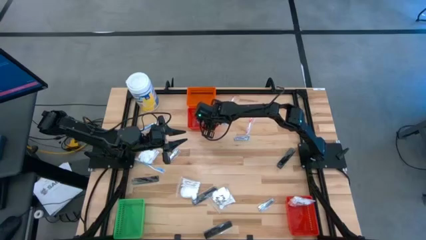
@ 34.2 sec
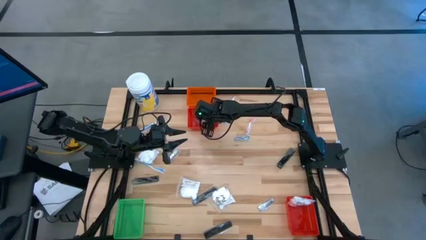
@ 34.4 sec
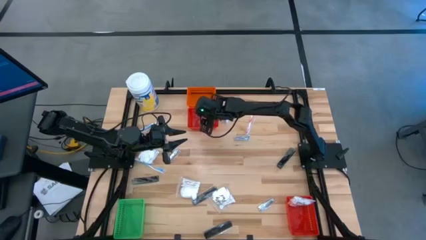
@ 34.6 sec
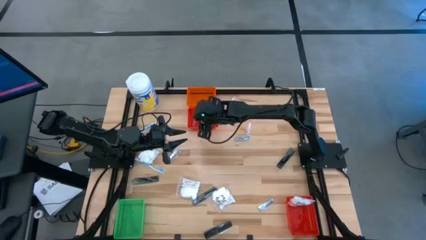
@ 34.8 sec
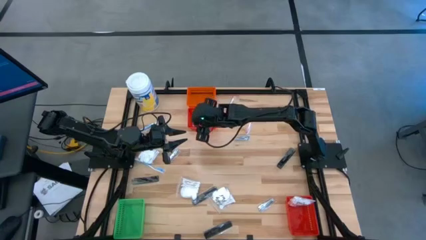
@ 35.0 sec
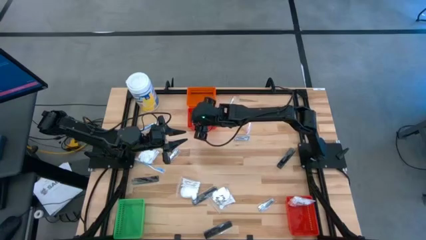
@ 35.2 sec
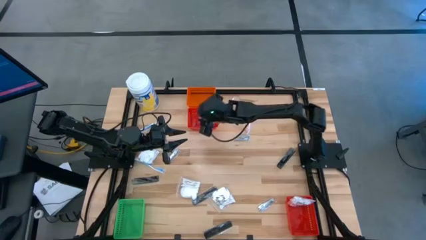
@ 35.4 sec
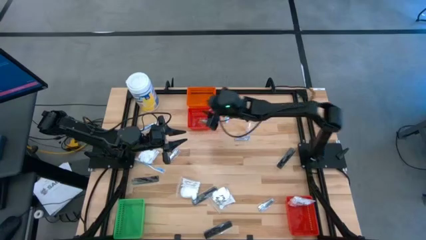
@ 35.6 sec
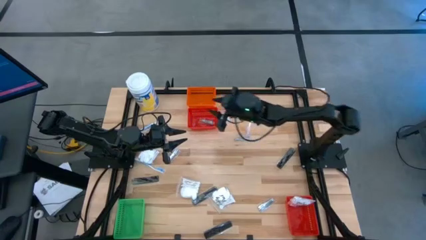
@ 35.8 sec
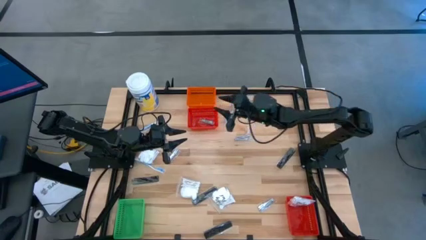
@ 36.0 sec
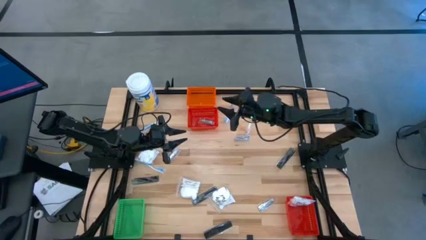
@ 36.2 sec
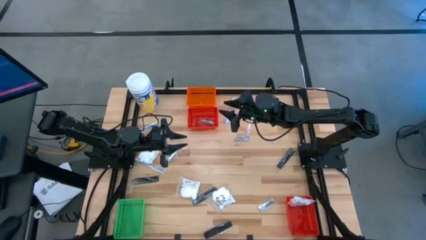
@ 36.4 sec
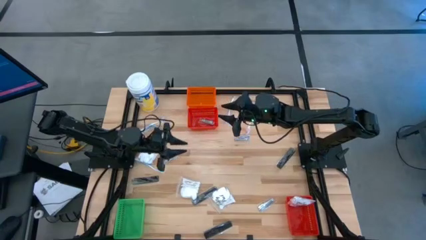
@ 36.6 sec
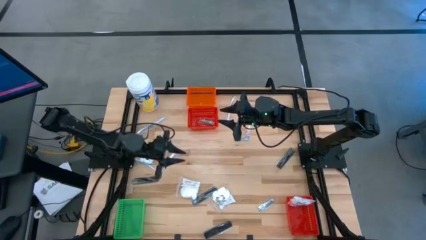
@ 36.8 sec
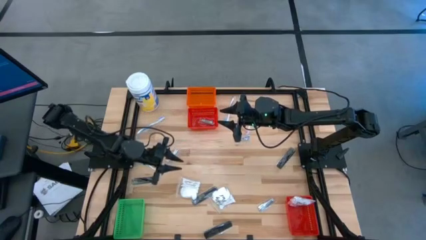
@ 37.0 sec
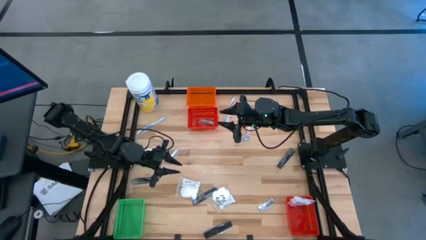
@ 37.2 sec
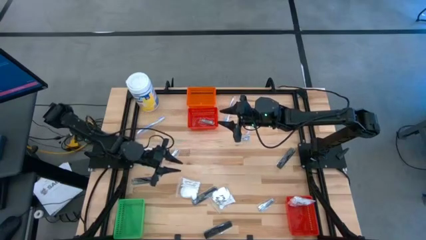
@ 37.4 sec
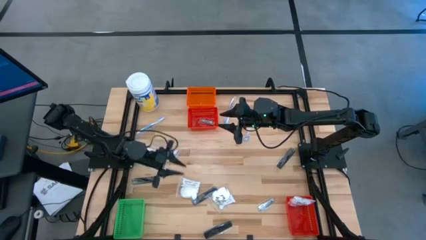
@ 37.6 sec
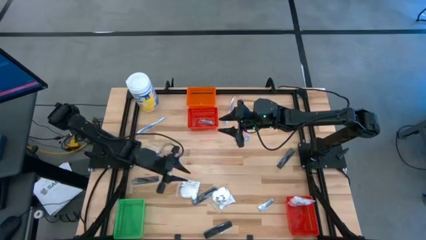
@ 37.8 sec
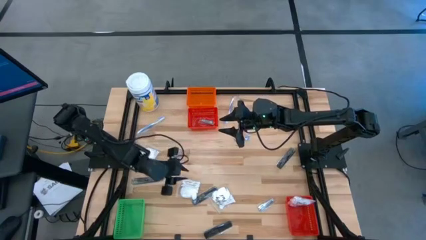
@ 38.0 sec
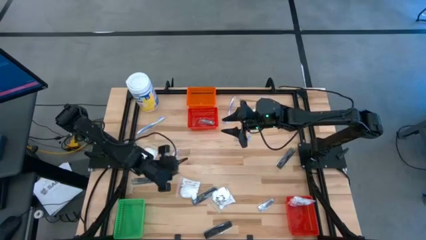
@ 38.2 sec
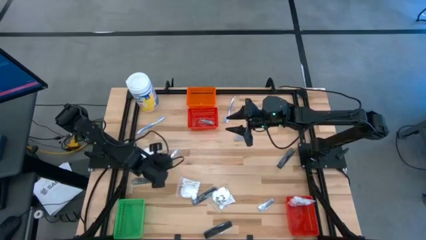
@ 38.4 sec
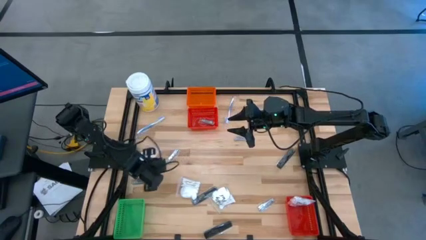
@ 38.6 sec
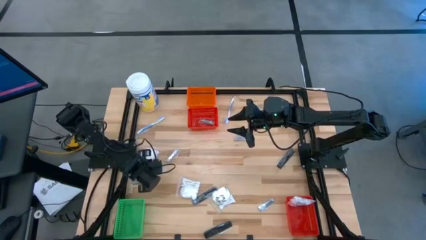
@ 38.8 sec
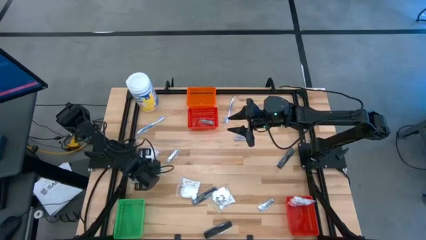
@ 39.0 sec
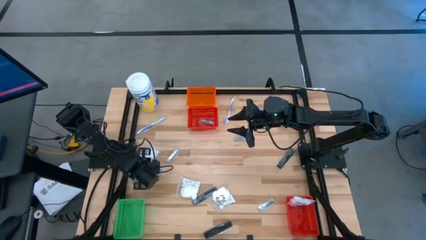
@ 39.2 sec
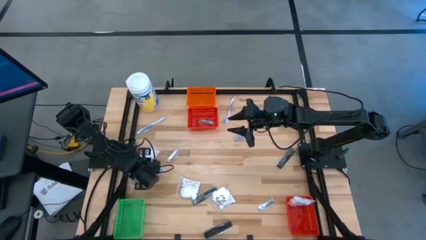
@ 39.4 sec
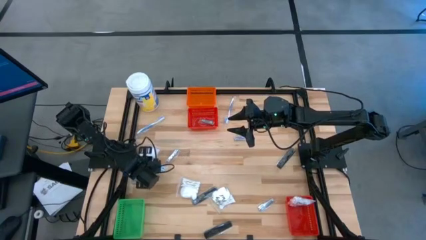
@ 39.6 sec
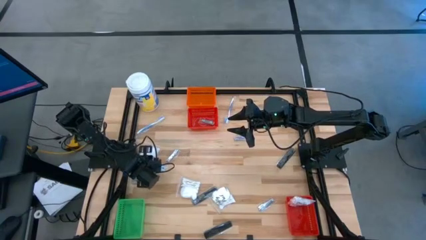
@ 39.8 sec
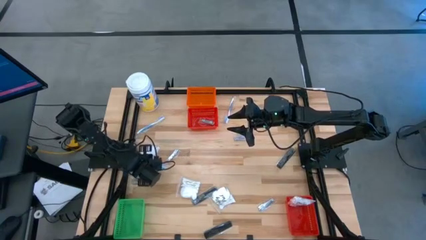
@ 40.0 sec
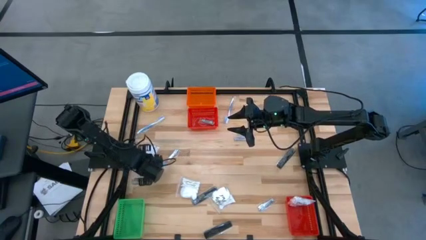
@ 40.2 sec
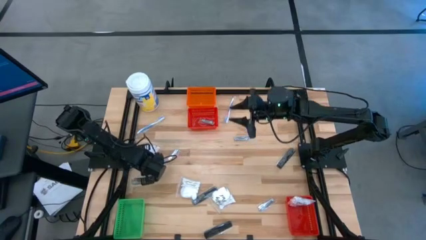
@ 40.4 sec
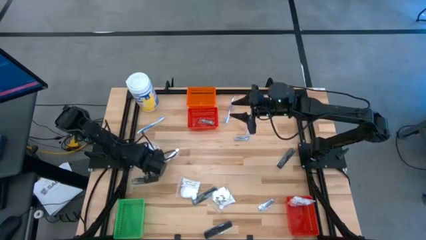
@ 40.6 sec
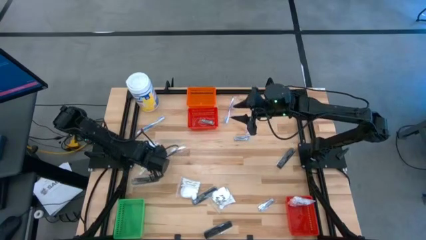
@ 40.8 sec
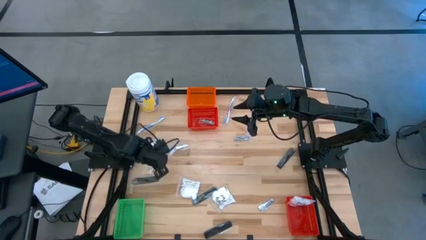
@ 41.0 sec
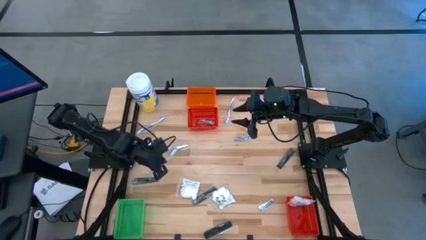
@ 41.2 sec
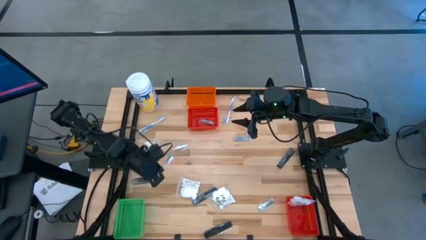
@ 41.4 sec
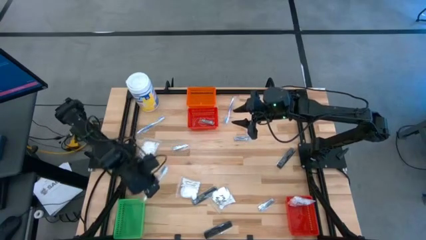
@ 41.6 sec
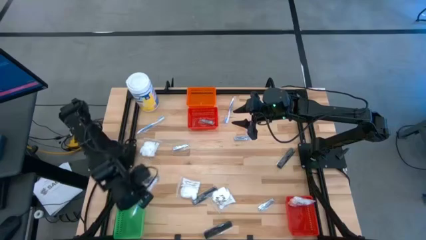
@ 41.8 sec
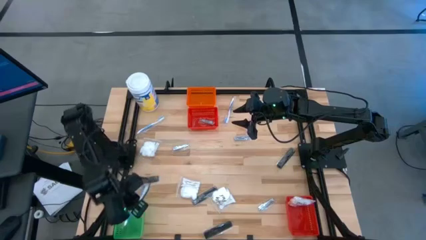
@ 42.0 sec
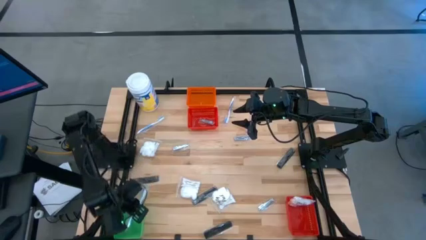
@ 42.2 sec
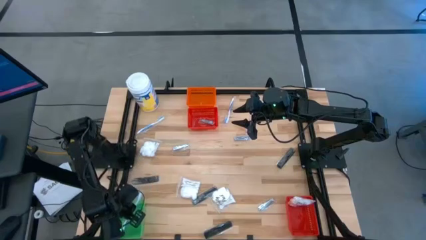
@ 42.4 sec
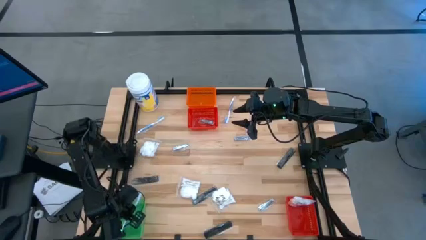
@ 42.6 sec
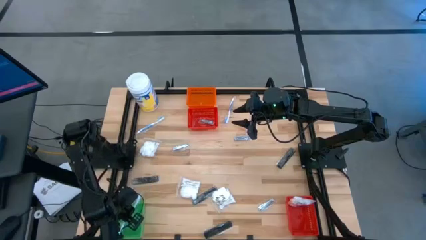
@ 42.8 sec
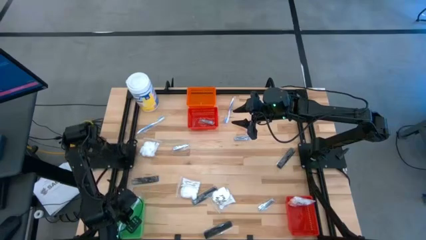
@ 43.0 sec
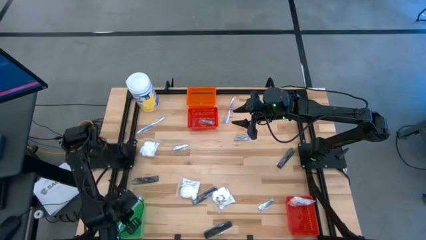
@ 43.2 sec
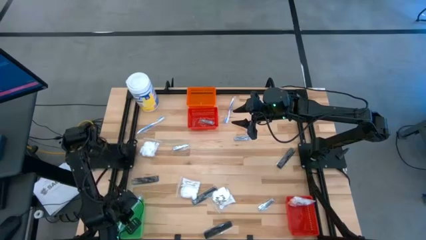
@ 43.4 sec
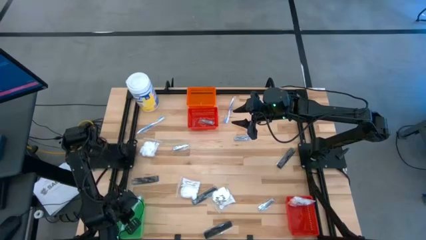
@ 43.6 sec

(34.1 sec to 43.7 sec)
Task: Pick & Place Travel size toiletries
Put the blue toothbrush into the green basket

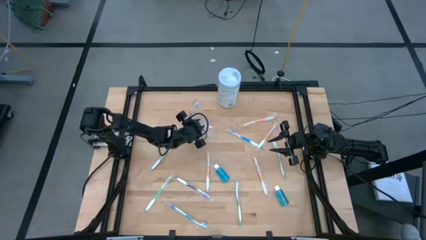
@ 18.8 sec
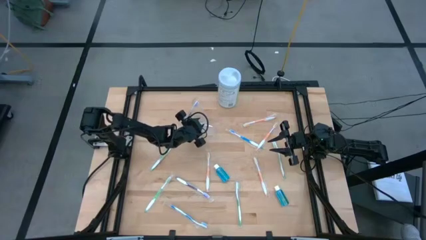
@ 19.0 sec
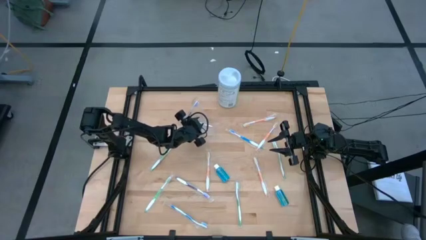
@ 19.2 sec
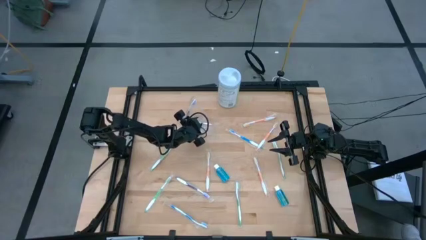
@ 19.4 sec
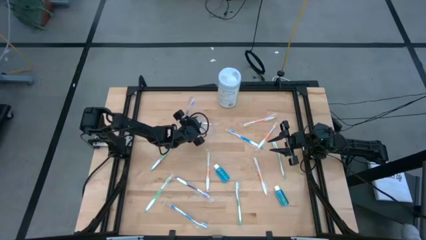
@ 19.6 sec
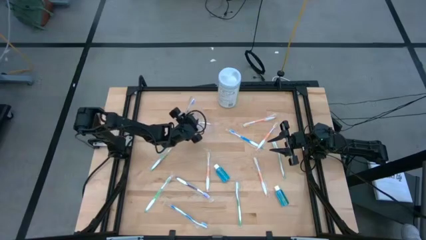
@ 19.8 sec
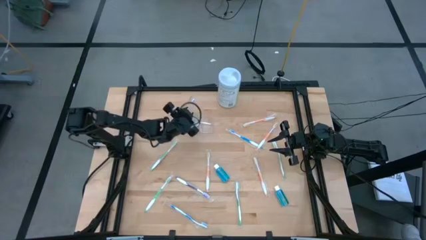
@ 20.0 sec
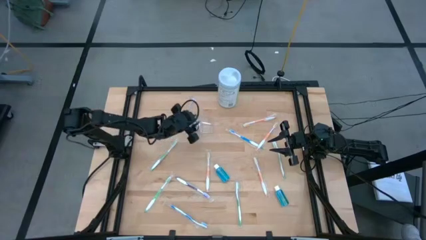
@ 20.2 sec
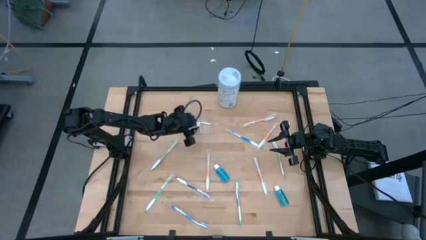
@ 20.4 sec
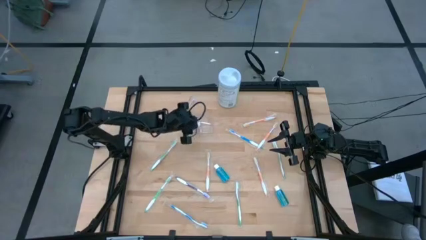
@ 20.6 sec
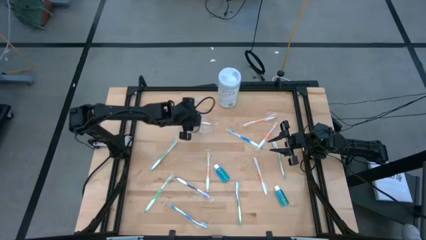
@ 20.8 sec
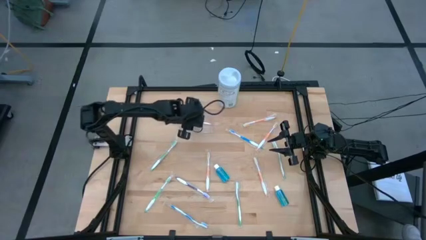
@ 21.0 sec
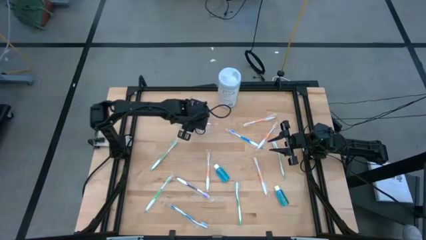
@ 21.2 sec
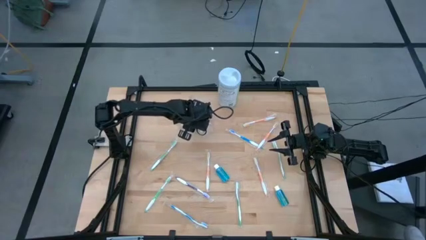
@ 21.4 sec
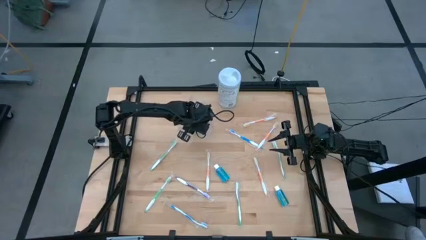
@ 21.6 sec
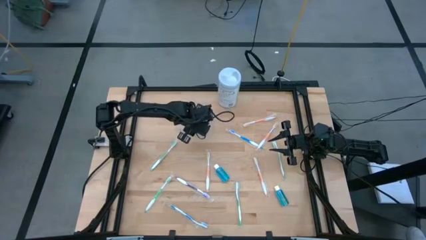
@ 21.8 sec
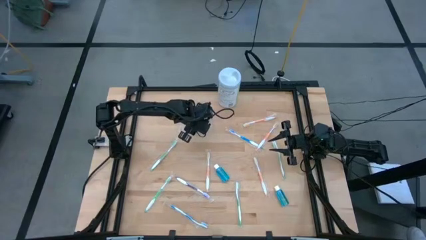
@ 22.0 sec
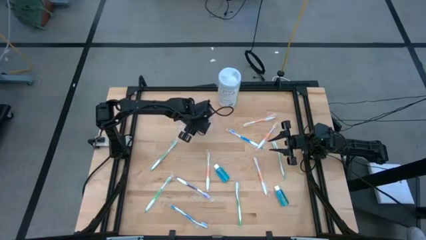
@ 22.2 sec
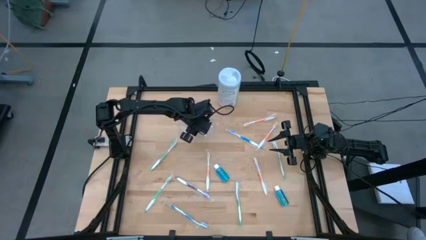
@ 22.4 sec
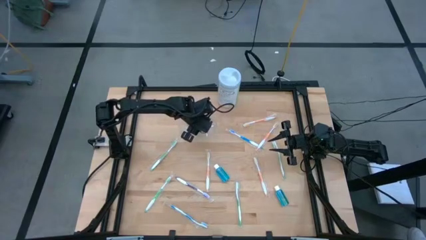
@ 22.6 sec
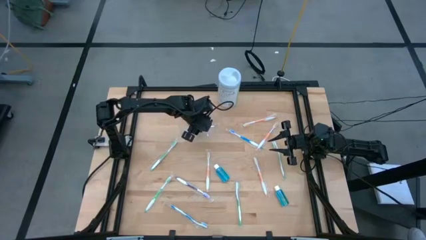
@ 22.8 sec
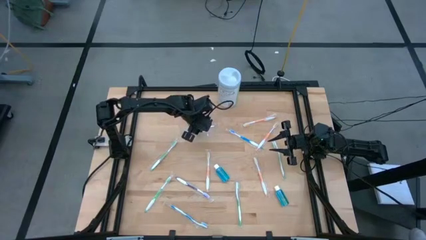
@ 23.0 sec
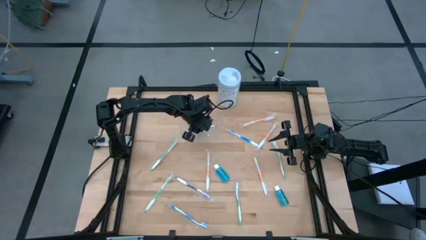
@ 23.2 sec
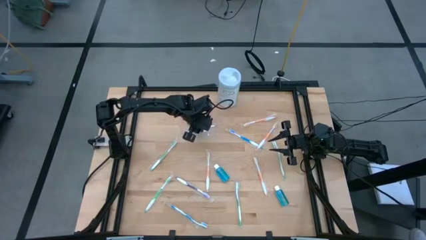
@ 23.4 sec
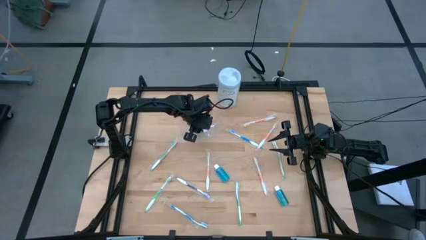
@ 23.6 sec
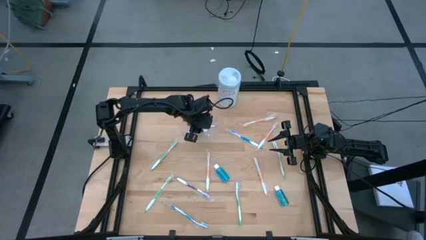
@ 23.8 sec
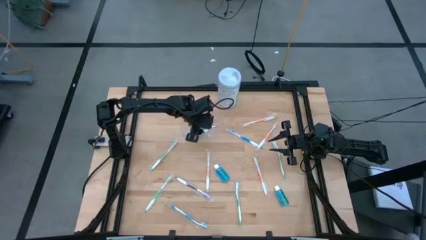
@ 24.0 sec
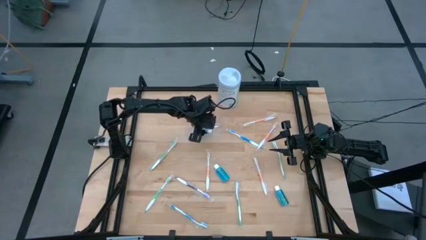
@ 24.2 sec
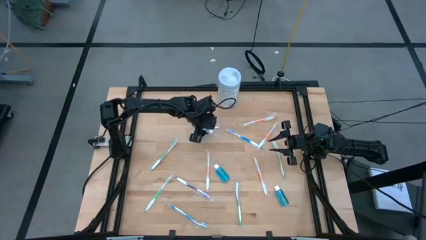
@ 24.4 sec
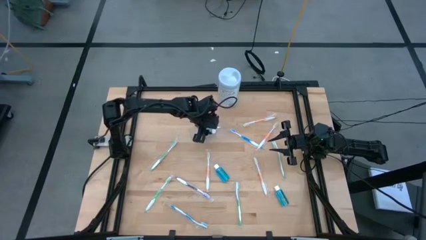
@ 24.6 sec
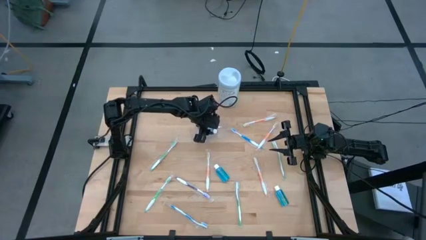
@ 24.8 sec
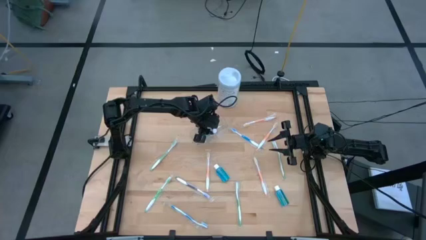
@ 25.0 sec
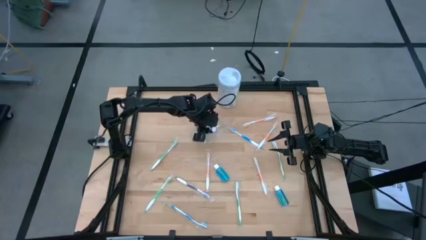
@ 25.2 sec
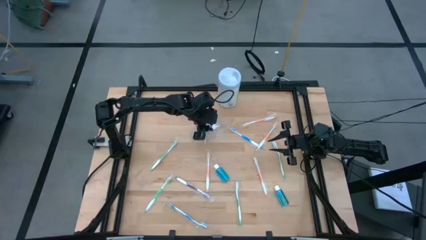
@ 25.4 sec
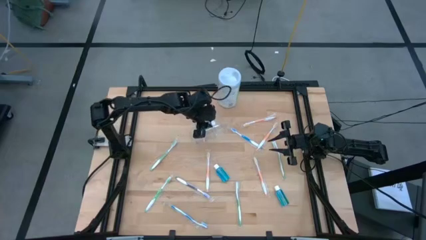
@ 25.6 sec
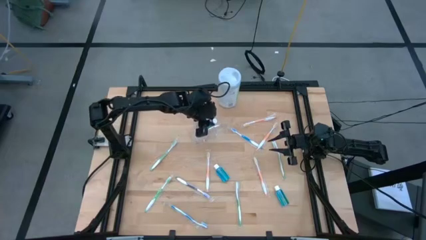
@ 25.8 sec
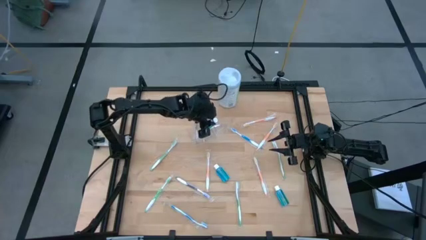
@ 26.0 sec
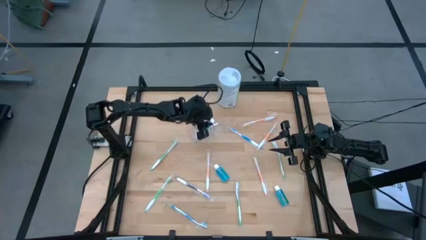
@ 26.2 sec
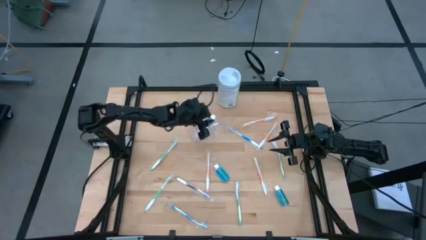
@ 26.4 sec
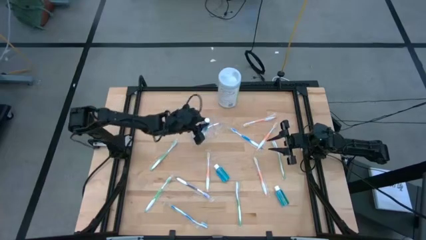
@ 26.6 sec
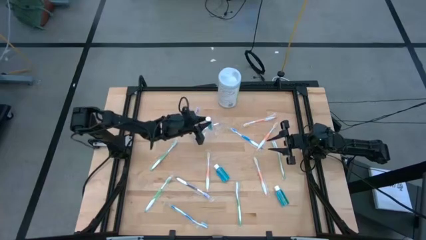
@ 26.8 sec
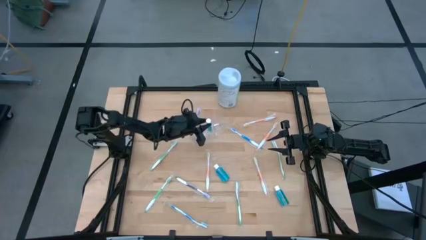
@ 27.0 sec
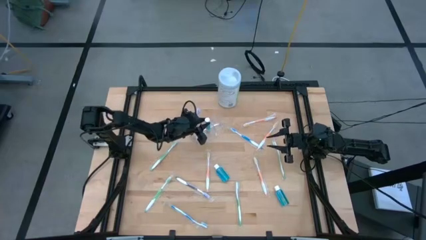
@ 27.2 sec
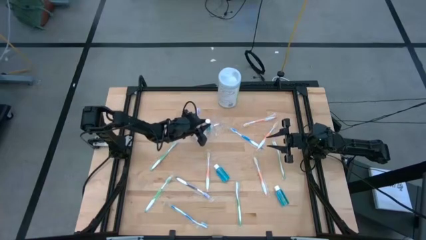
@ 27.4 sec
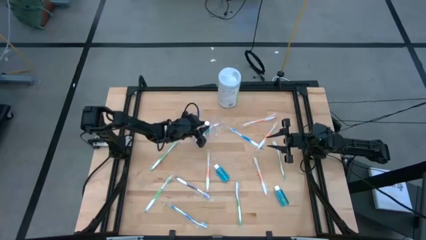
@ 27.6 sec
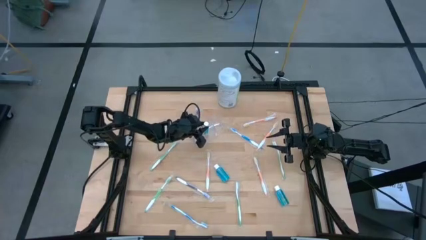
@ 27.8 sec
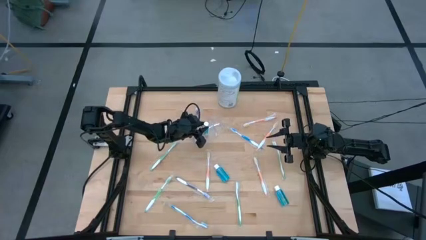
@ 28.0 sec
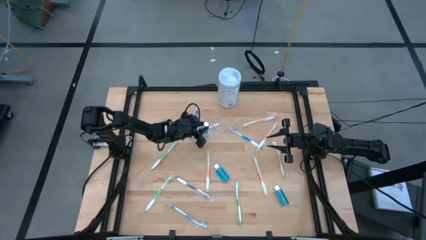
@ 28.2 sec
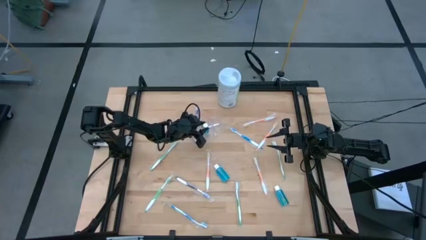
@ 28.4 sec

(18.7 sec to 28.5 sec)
Task: Pick & Place toothbrushing station
Put the blue mouthwash into the transparent organizer
